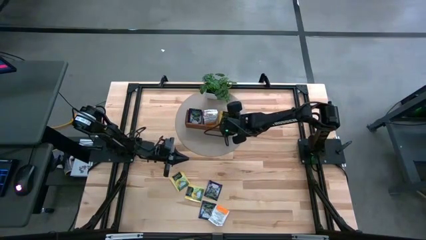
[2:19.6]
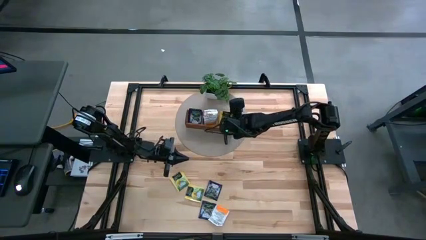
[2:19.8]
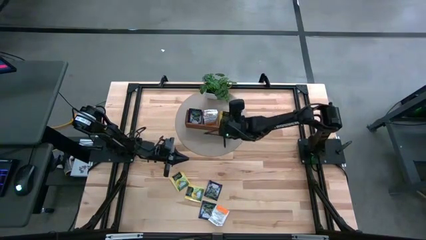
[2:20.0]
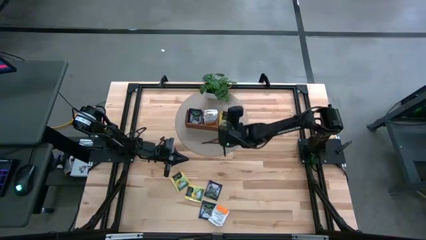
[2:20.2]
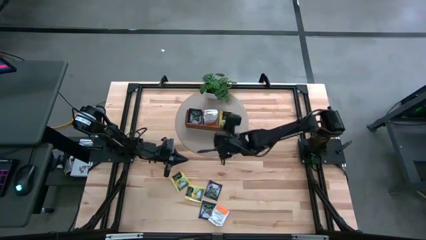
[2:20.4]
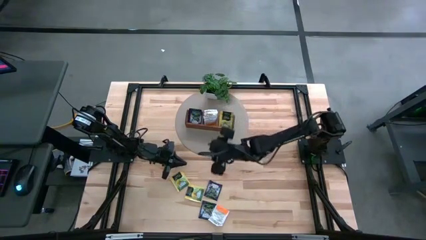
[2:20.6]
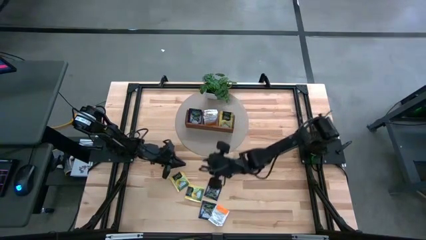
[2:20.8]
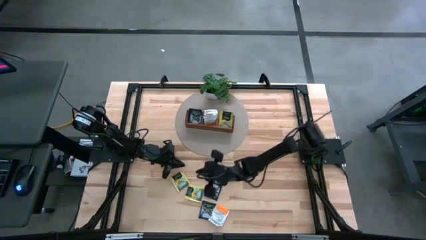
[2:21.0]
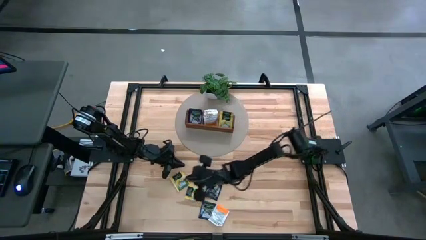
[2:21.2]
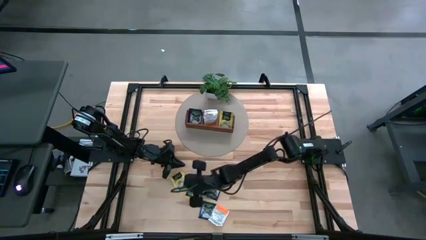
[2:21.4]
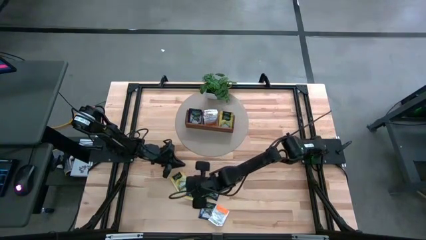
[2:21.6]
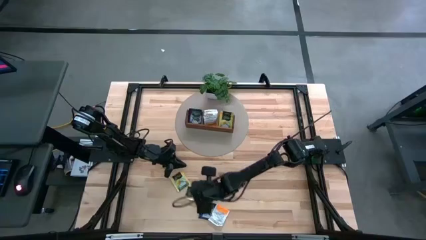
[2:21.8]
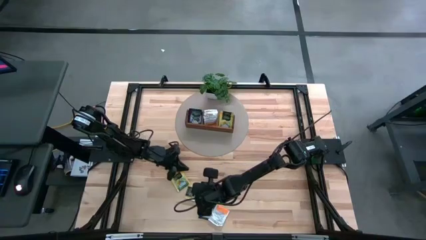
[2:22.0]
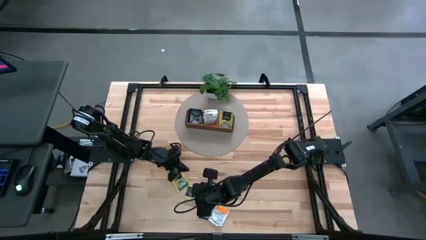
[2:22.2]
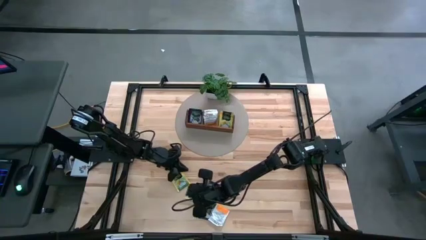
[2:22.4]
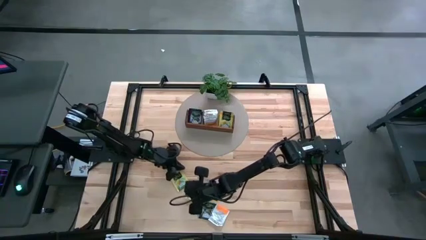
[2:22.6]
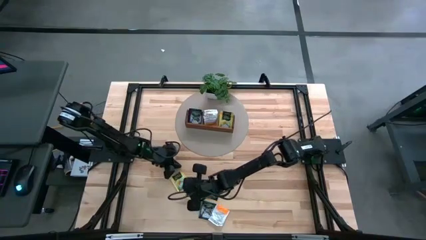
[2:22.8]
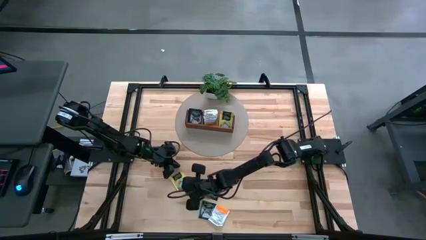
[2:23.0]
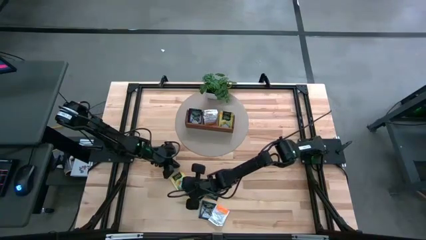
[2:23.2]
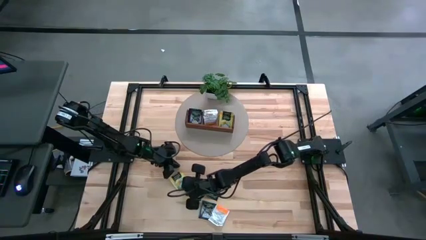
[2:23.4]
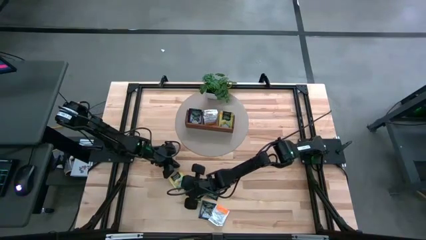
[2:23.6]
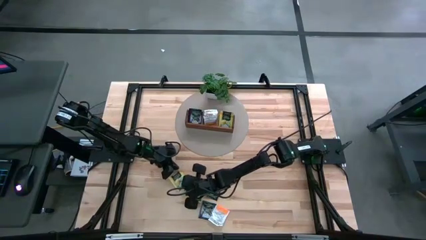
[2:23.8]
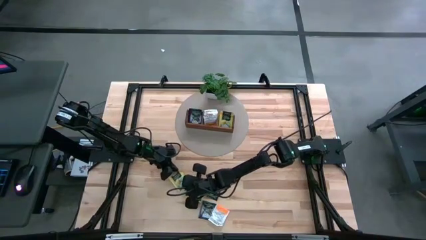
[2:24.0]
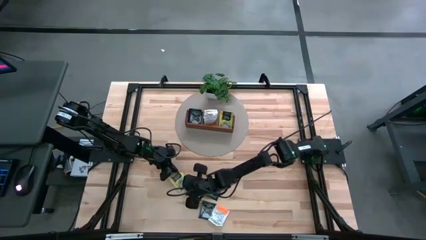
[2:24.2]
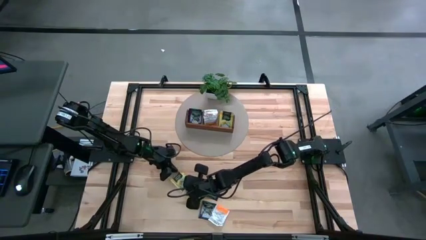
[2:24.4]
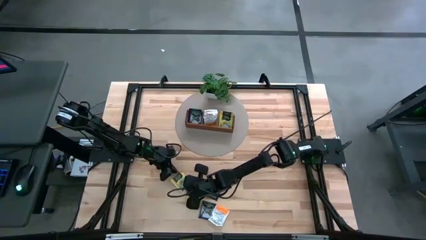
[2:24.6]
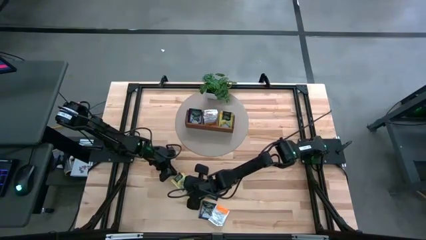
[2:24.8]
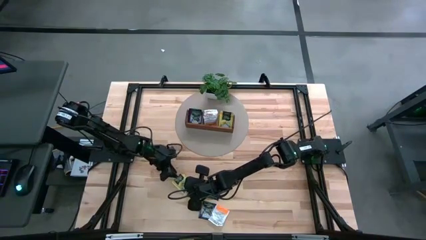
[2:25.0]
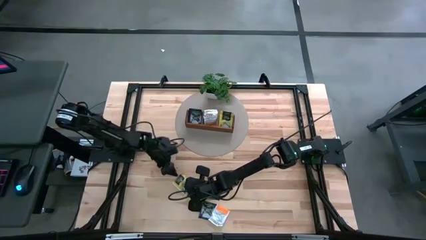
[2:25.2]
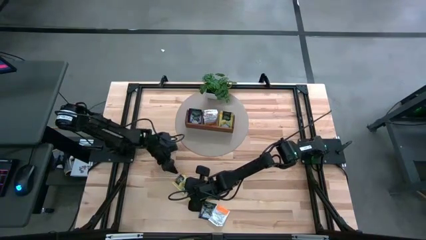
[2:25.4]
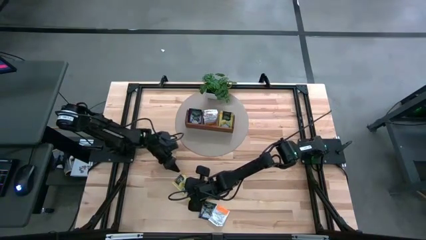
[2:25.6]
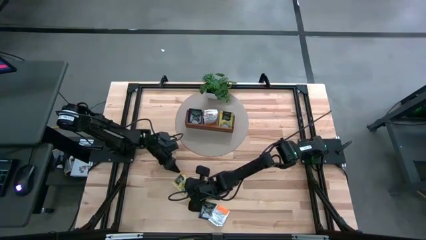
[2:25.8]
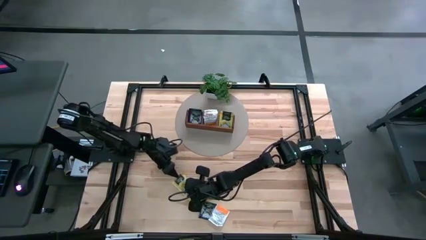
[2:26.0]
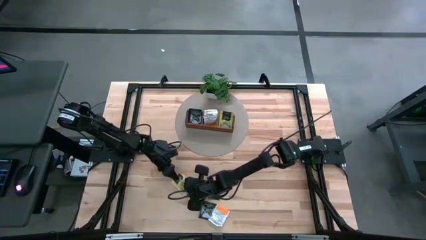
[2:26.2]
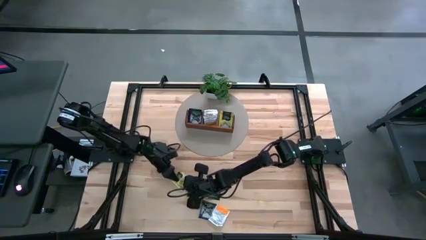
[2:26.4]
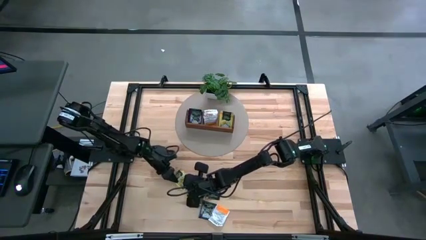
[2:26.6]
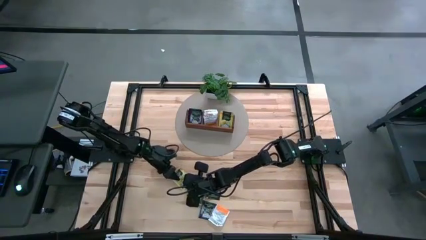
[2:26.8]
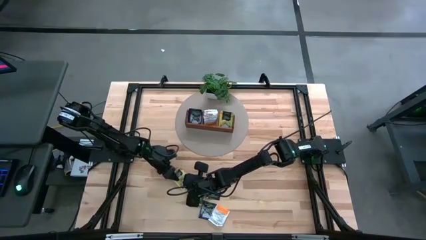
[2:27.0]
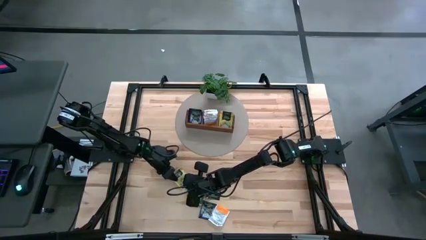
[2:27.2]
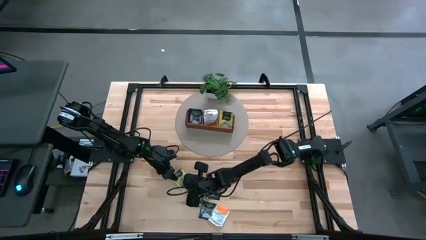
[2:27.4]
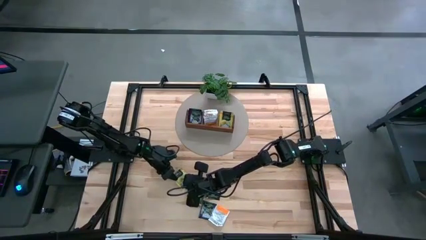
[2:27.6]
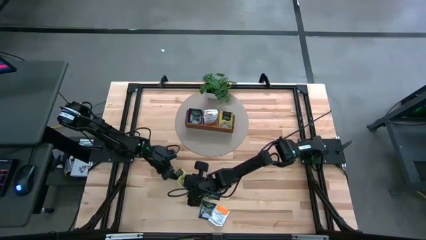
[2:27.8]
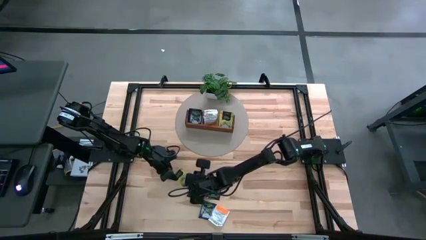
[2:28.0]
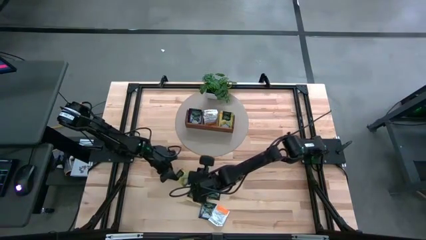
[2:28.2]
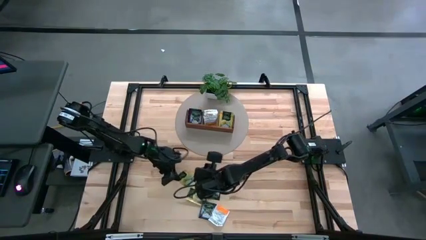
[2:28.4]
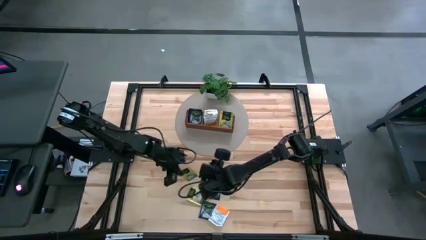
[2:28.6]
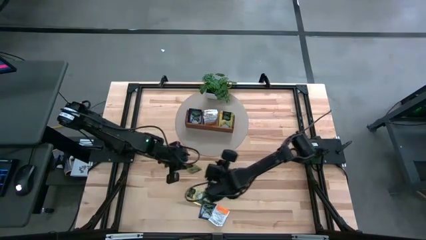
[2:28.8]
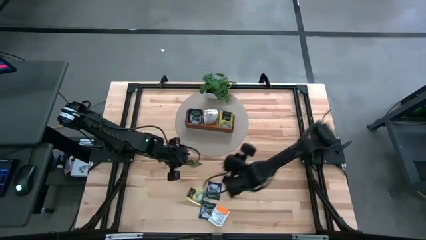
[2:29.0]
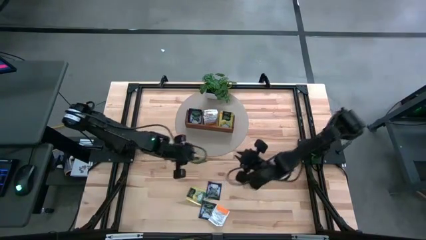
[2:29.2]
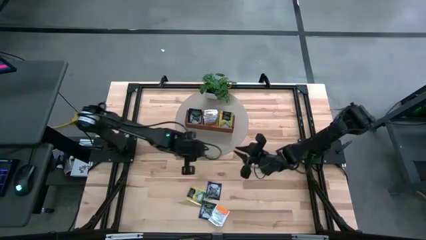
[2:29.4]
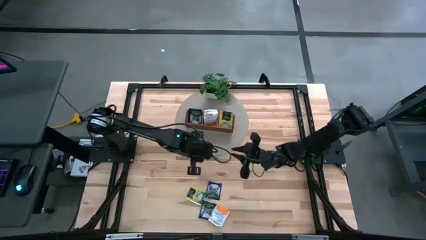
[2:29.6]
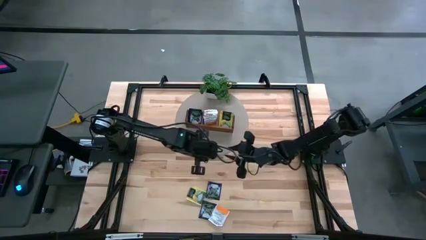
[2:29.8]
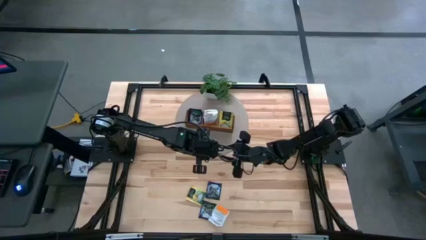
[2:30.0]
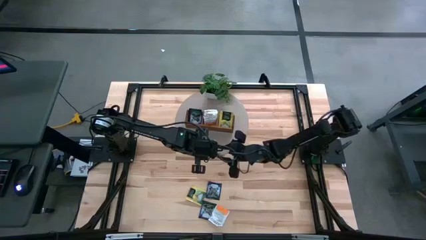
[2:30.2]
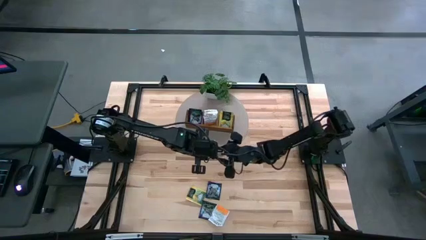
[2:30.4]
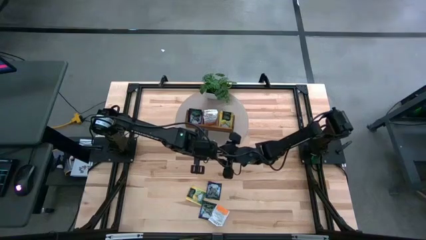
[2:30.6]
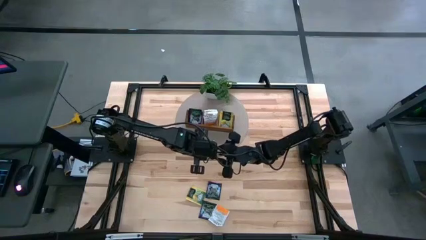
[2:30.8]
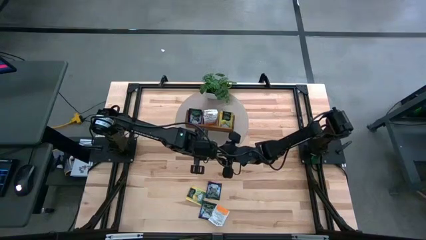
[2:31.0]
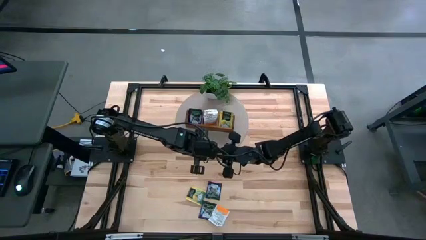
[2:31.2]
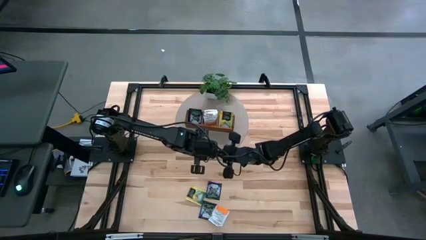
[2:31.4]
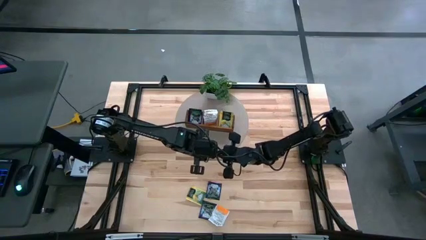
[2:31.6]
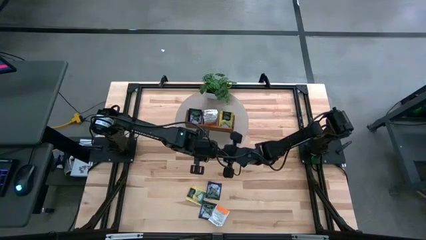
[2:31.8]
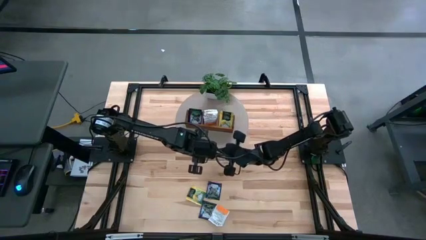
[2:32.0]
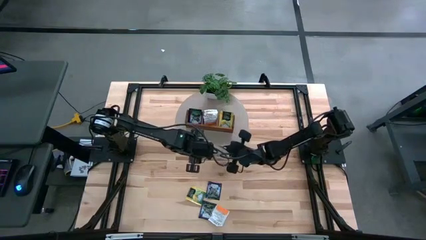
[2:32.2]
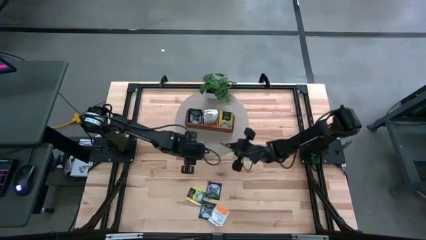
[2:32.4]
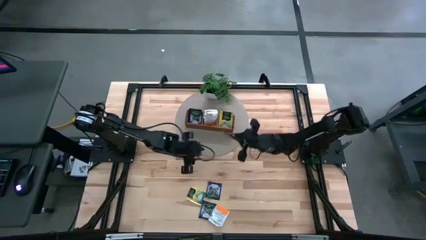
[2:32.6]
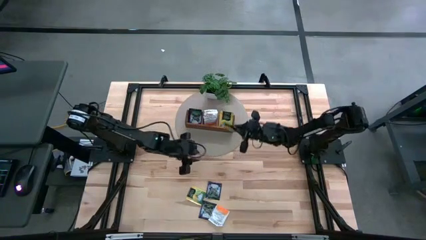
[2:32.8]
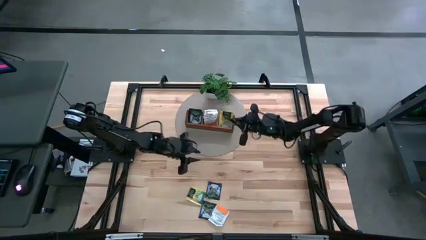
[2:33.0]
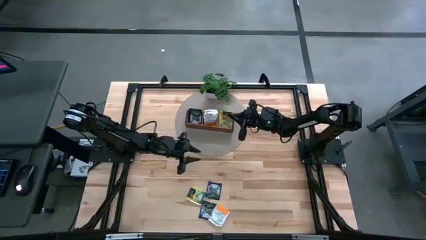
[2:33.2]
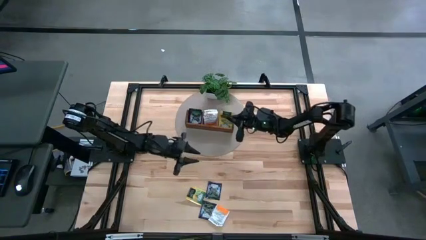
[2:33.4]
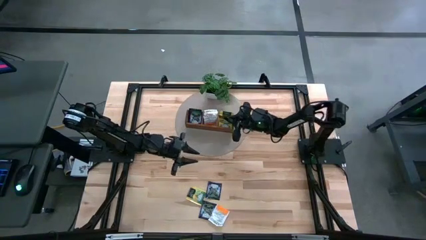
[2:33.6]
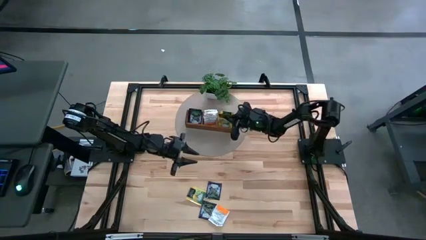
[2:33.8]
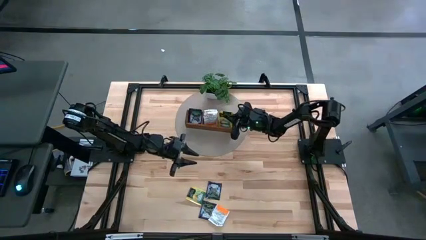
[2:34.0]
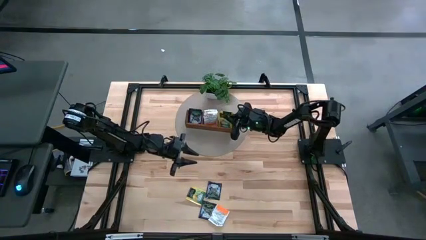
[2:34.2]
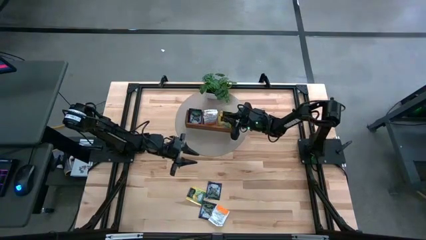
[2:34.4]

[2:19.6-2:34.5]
Task: Pick & Place Tea
Put the left yellow tea bag into the right section of the wooden organizer

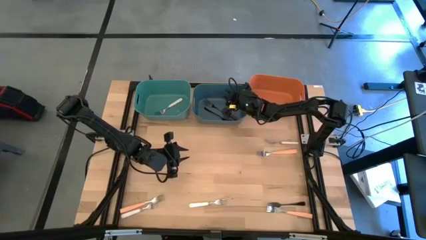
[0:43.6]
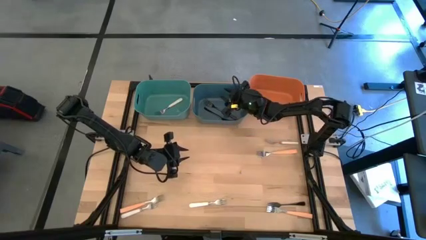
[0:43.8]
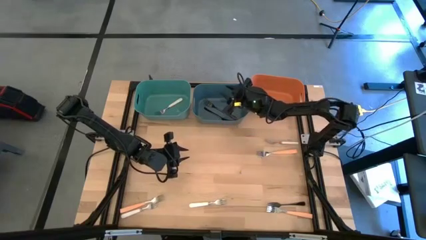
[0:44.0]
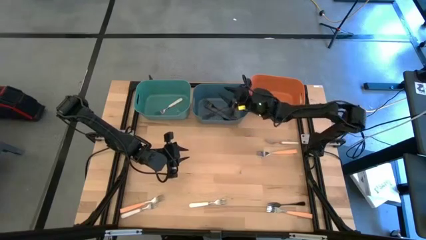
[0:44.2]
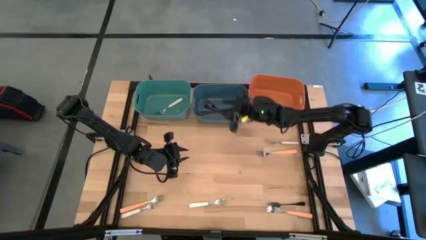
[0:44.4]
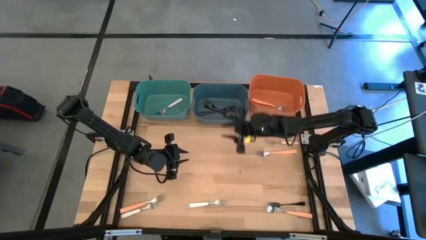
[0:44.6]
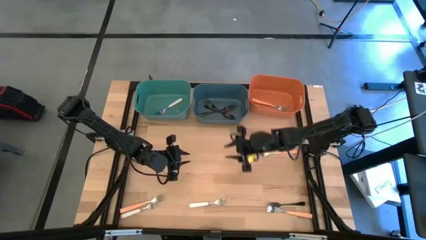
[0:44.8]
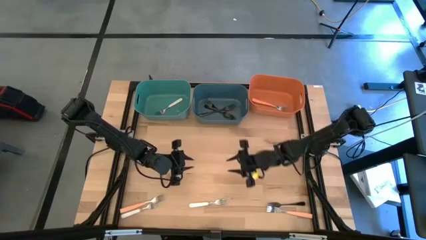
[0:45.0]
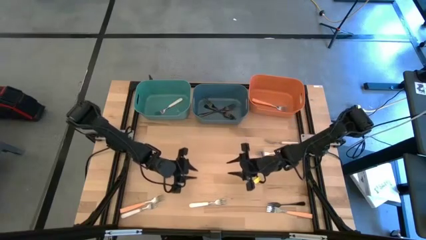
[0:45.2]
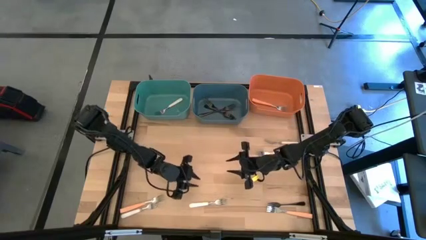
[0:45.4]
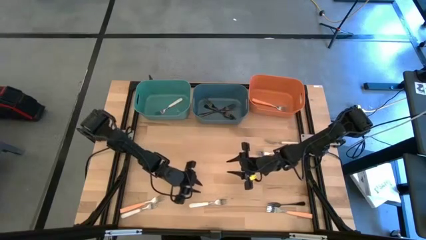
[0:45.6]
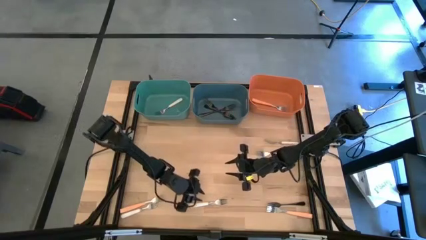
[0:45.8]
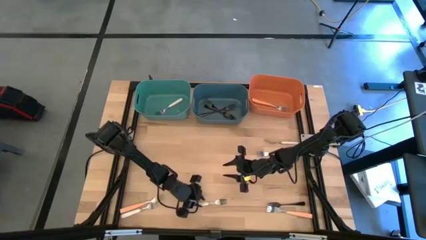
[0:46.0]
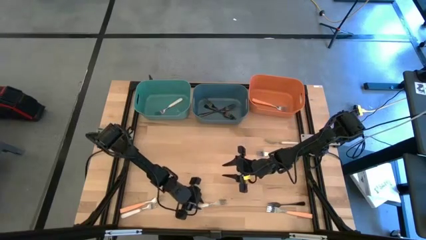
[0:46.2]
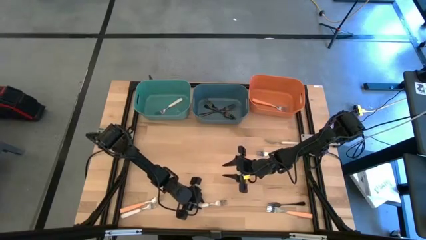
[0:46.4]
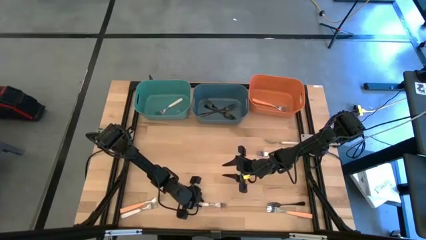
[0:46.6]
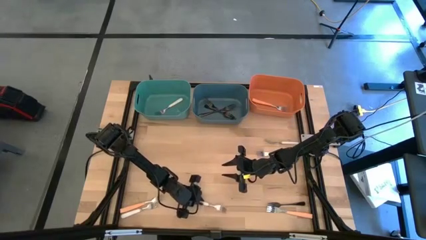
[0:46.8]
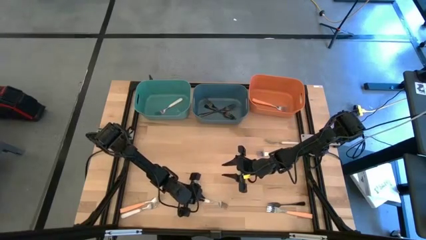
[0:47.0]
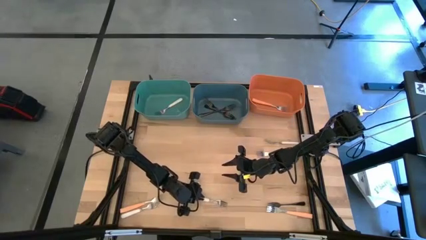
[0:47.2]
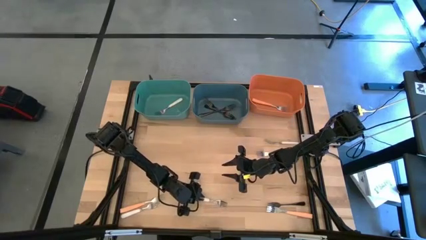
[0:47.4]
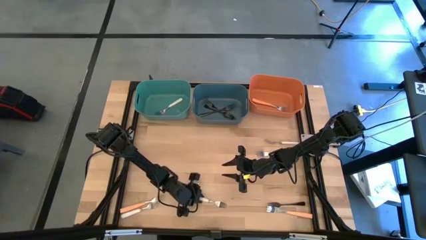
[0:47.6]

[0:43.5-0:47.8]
Task: Sort silverware by color (type)
Put the bottom right white fork into the green bin
